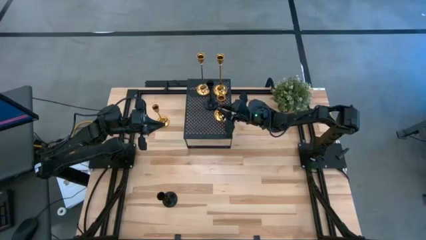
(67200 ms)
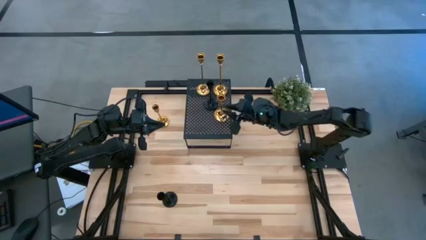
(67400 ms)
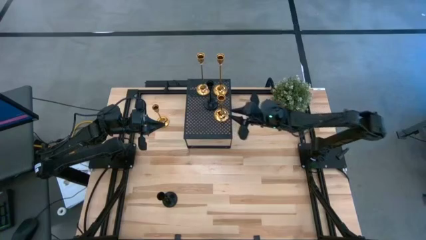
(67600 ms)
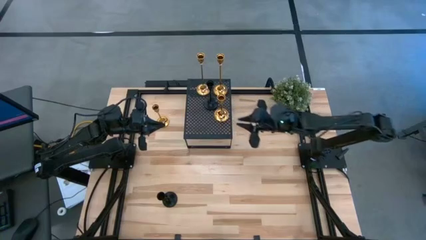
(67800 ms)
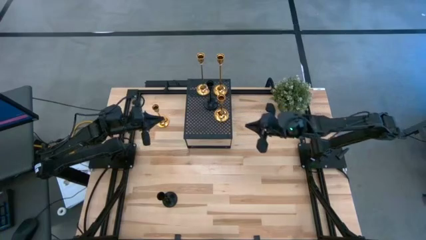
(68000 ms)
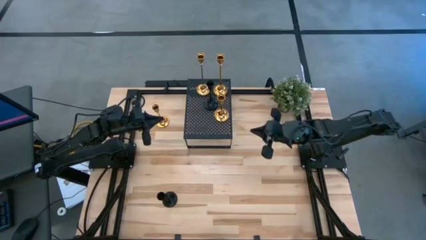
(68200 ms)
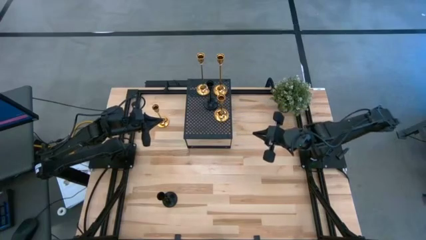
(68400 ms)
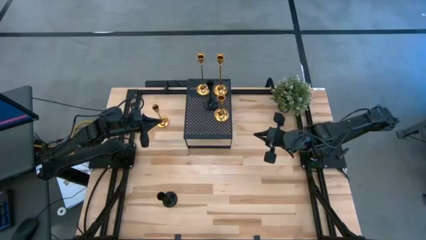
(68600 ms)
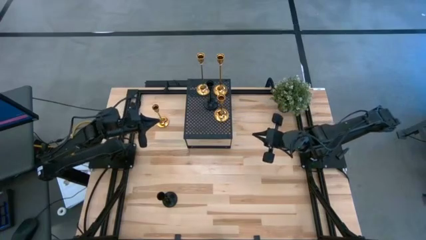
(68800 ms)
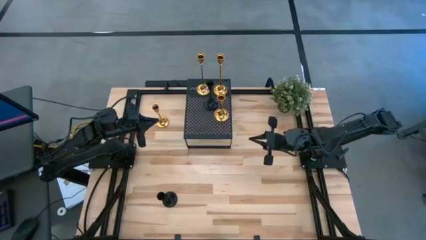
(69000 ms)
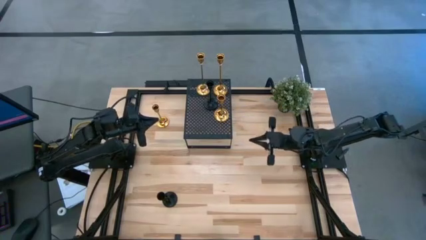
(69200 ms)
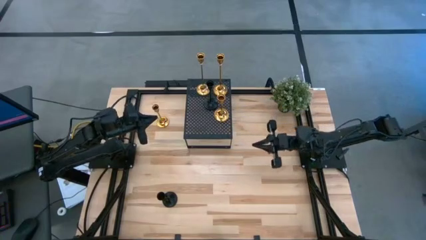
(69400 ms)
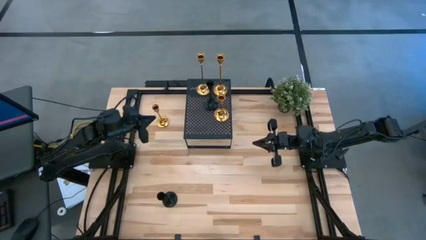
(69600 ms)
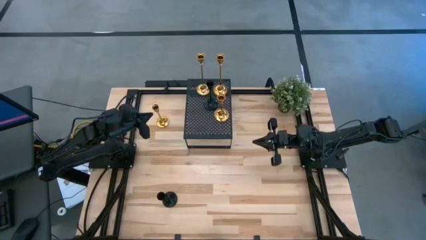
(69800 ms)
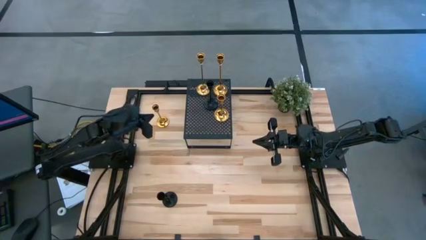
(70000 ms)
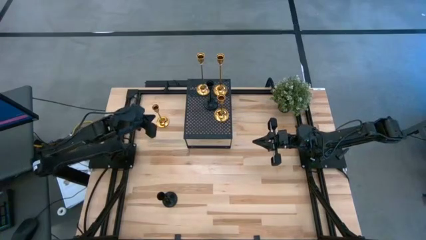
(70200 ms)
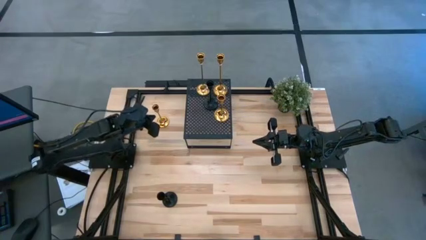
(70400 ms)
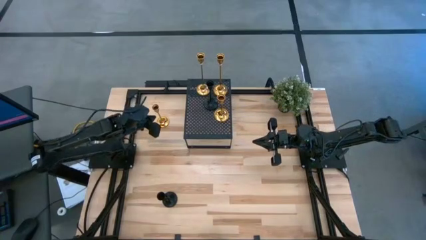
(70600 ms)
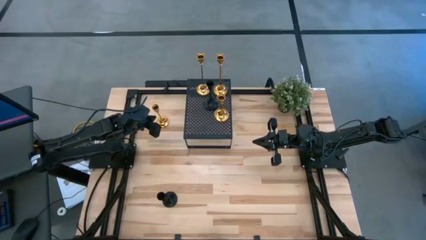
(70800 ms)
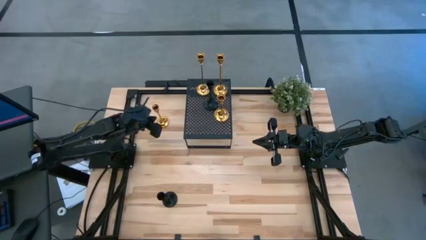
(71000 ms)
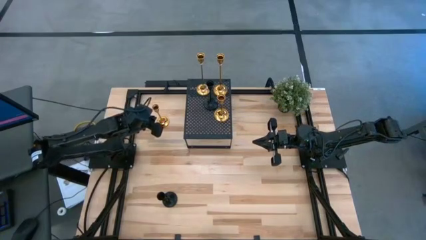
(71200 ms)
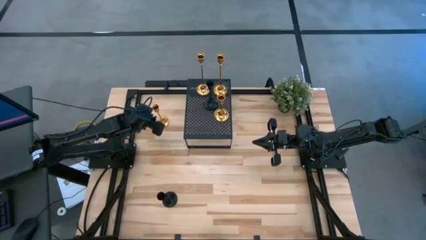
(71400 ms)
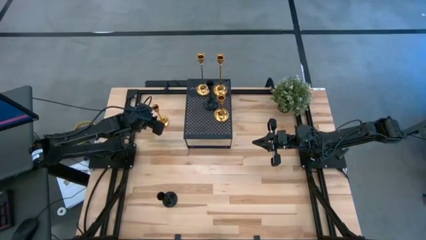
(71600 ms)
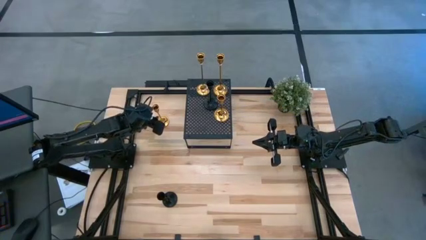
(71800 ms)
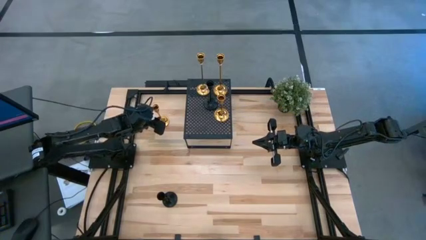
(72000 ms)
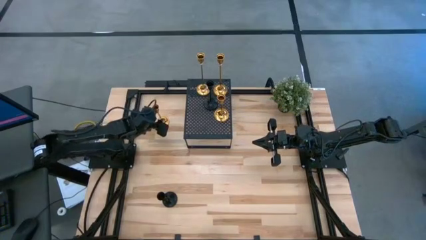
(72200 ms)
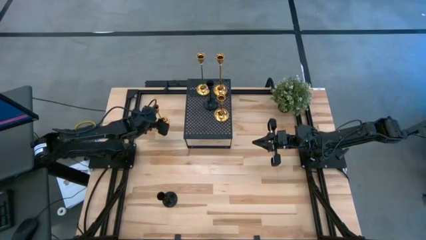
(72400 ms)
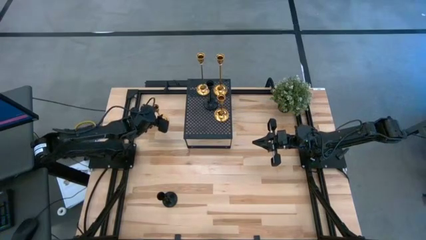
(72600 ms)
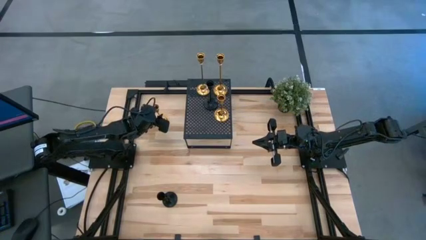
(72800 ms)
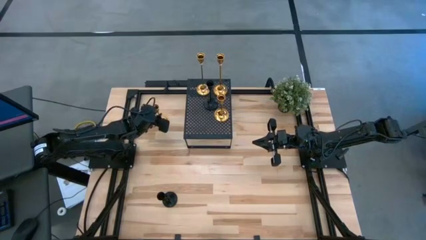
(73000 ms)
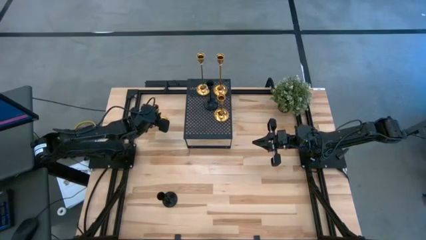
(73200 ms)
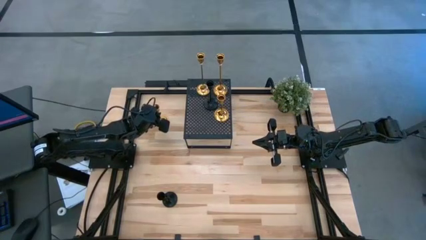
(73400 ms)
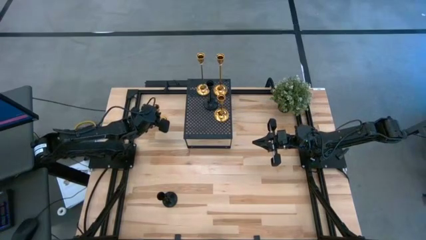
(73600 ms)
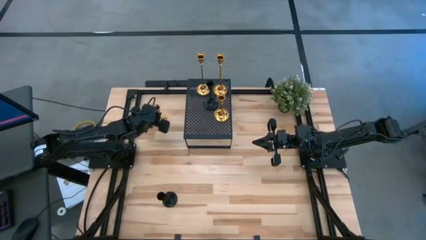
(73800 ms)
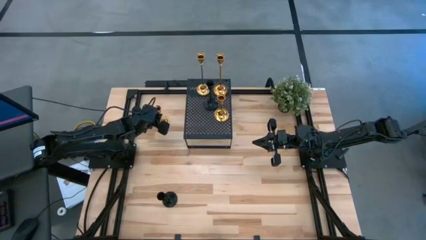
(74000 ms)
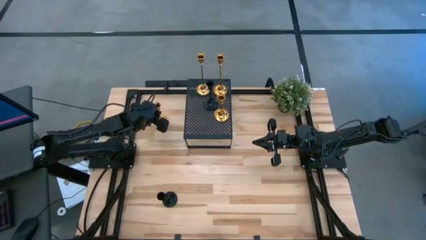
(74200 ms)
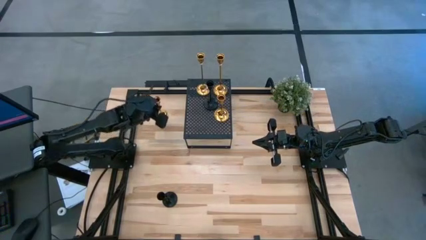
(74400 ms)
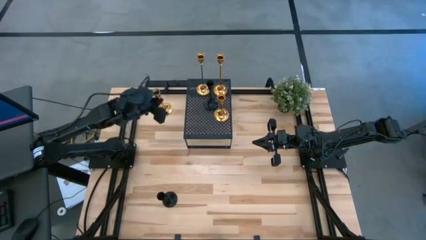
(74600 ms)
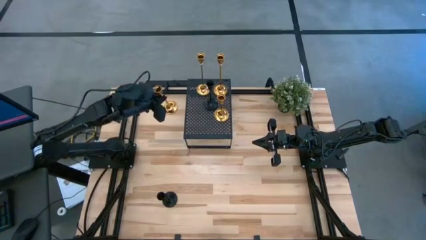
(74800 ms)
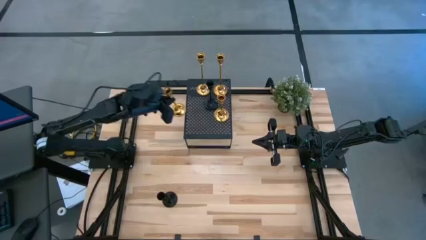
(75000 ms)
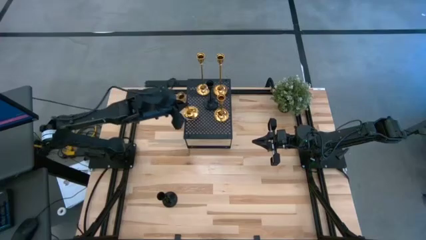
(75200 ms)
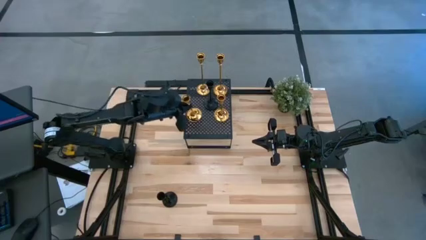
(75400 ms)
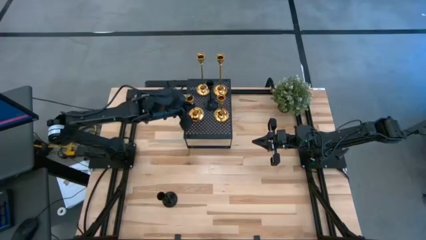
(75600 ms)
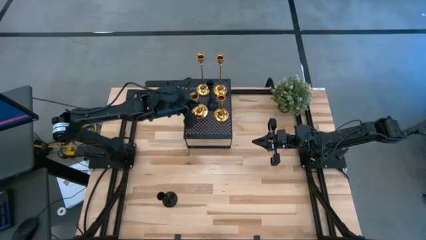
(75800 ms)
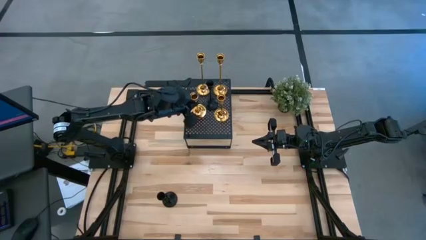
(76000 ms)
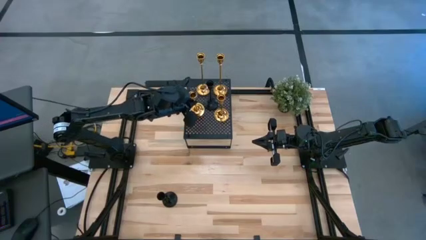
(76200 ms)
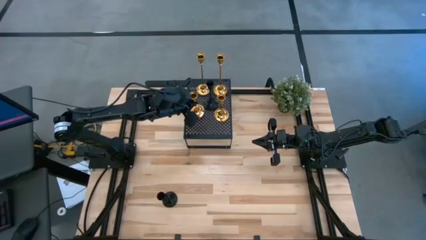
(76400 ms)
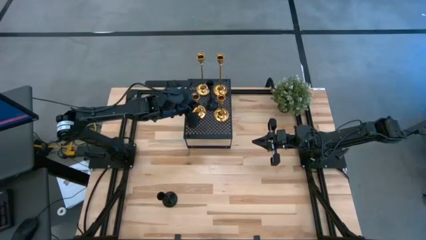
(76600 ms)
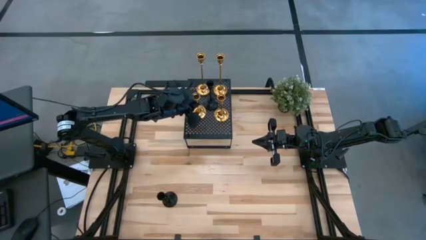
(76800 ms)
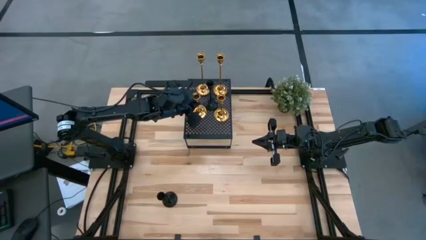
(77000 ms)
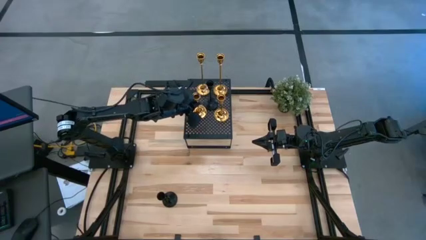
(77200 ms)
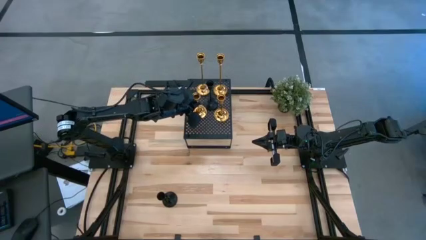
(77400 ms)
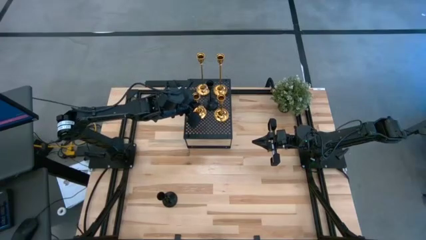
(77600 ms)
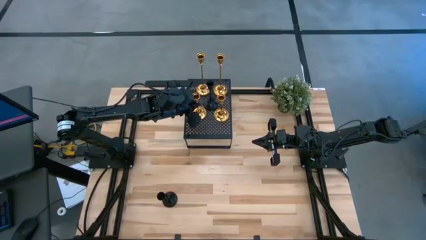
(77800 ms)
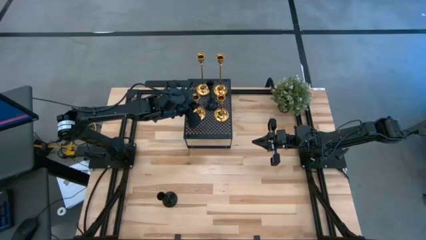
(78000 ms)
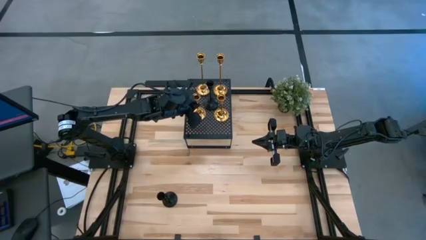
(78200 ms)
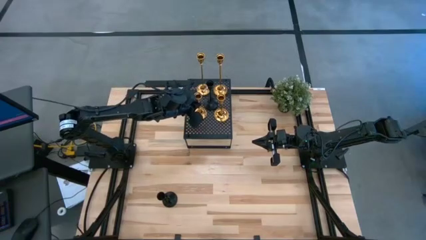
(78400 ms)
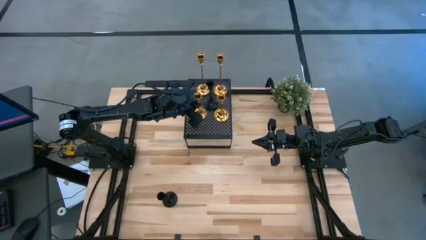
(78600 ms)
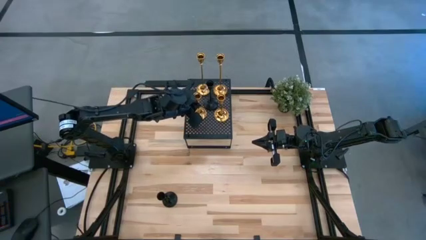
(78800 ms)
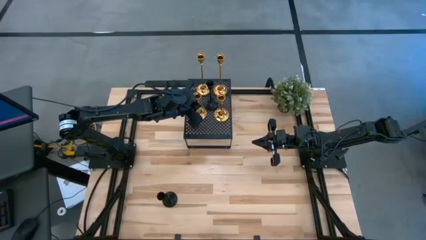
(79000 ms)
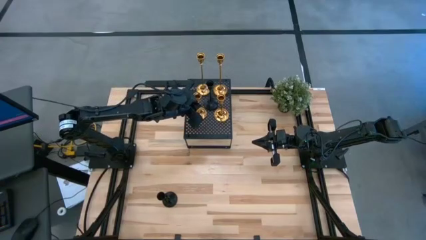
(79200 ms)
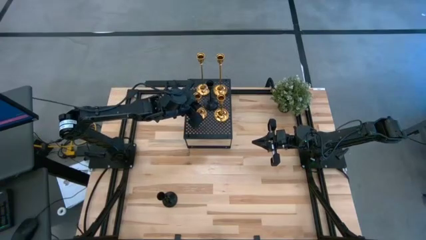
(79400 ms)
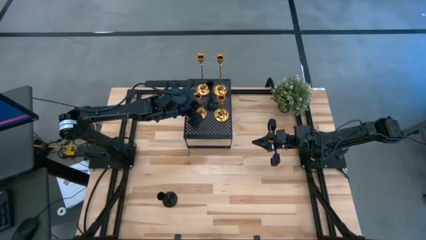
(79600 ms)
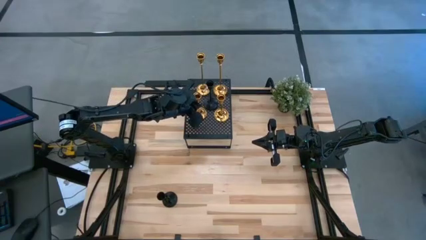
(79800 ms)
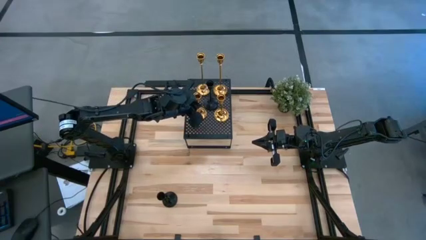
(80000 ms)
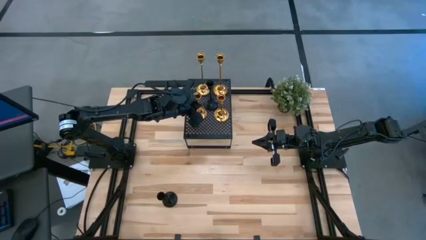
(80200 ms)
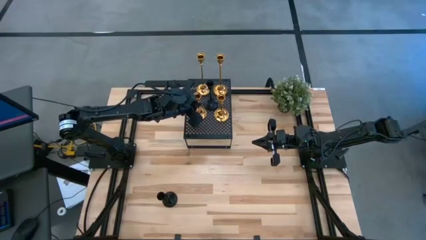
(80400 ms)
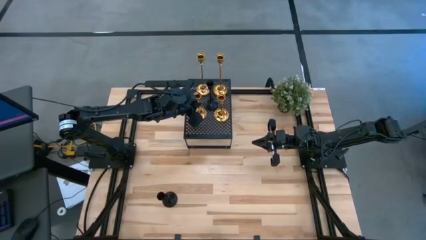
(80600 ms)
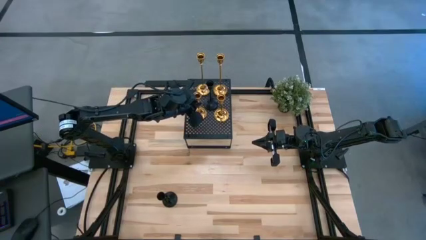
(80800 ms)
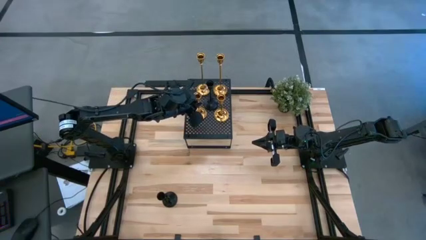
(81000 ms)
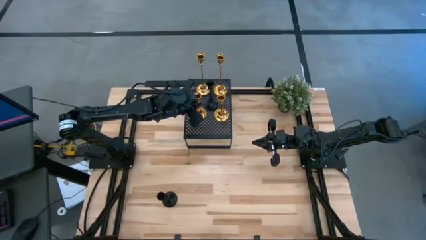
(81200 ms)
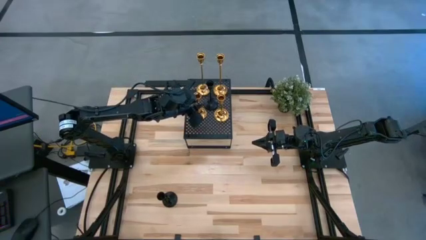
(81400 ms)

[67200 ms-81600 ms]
Task: Pick & Place candle stick holders
Put the small gold candle holder on the shelf
